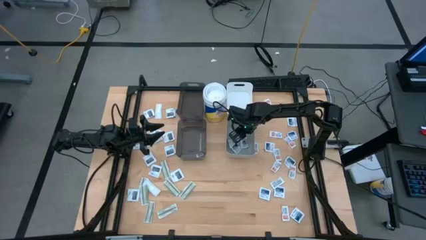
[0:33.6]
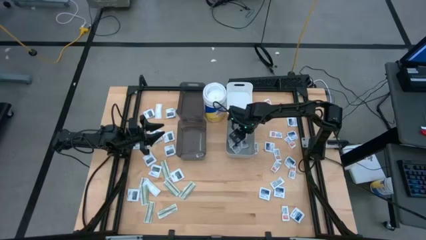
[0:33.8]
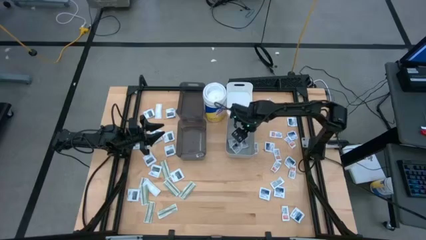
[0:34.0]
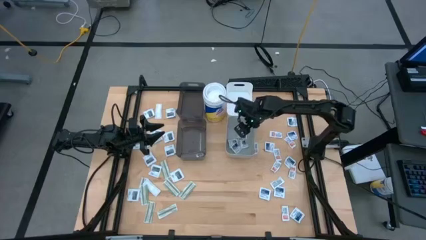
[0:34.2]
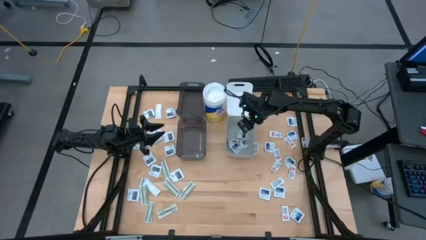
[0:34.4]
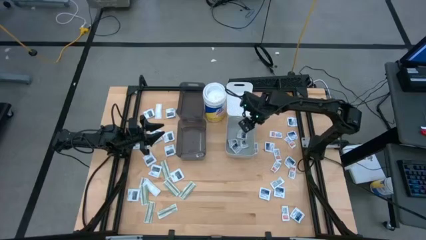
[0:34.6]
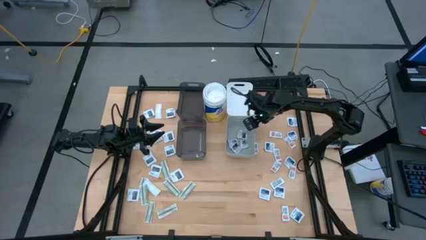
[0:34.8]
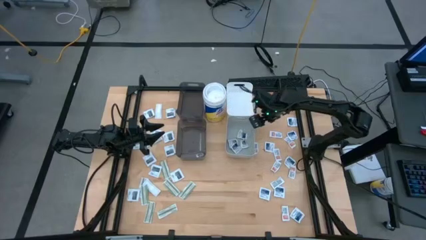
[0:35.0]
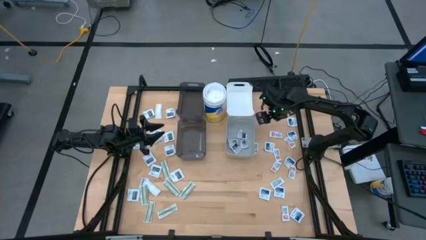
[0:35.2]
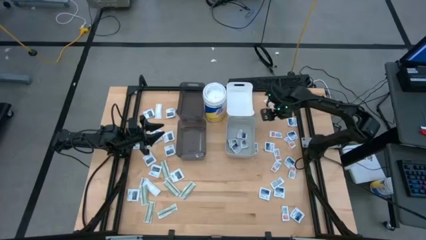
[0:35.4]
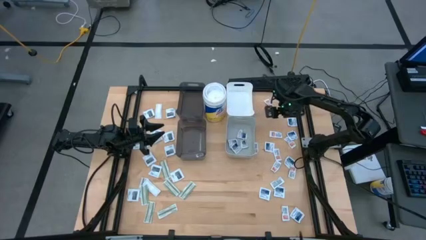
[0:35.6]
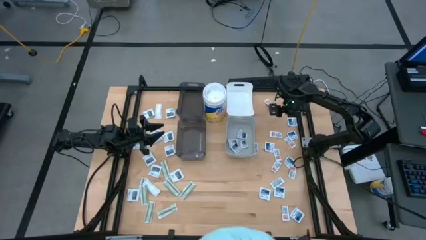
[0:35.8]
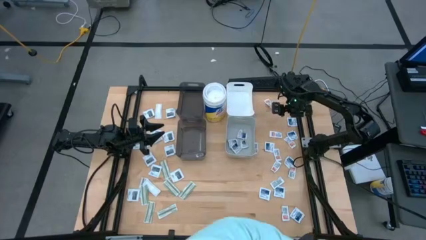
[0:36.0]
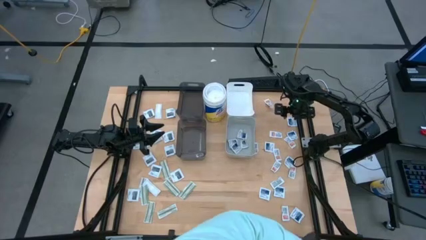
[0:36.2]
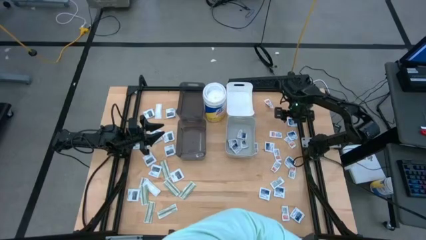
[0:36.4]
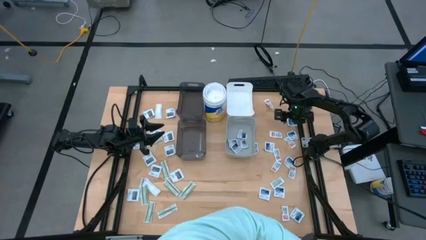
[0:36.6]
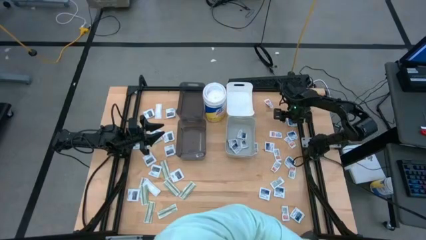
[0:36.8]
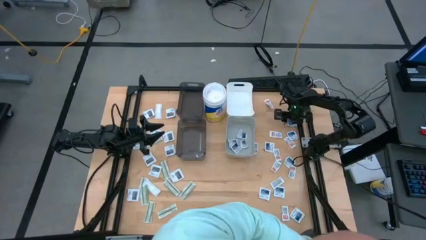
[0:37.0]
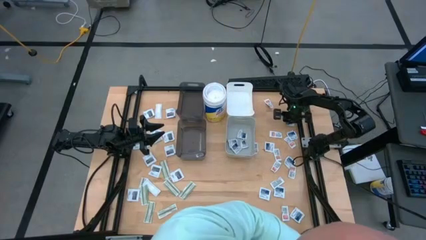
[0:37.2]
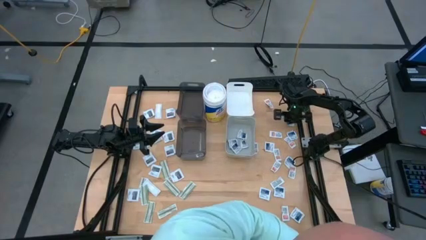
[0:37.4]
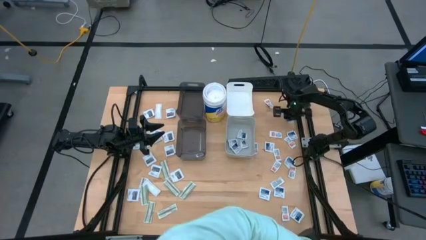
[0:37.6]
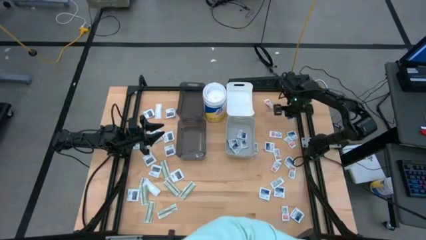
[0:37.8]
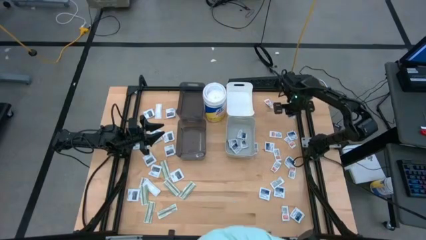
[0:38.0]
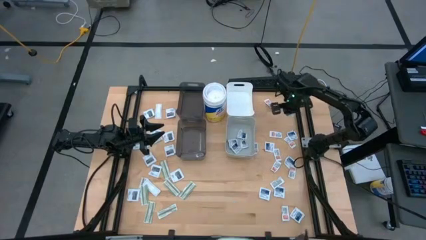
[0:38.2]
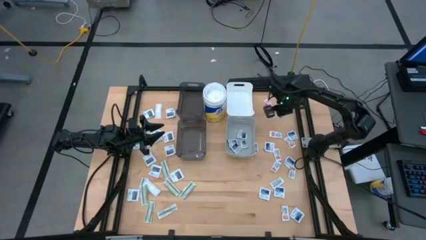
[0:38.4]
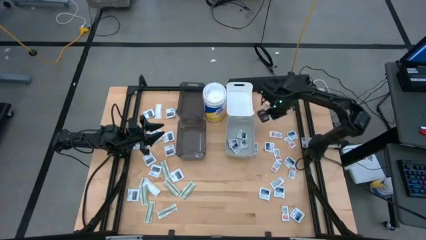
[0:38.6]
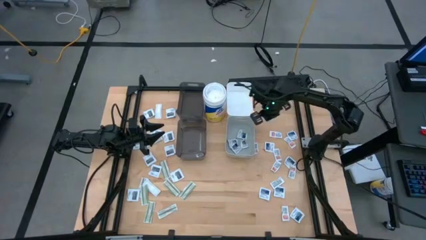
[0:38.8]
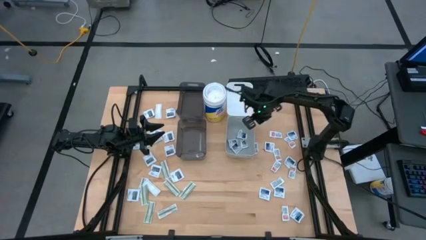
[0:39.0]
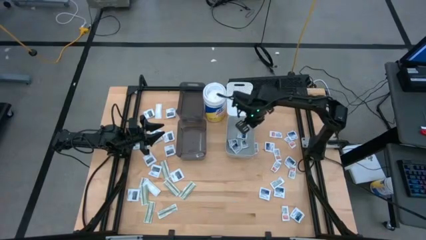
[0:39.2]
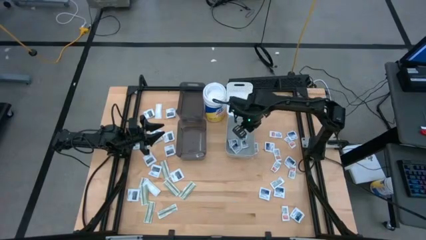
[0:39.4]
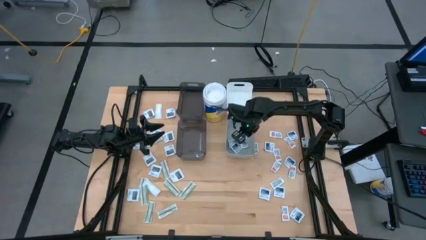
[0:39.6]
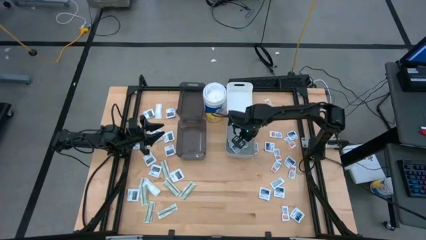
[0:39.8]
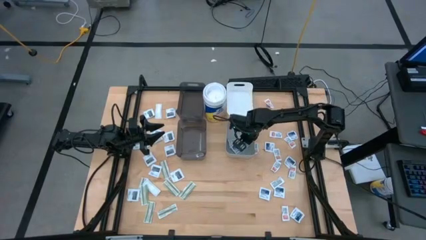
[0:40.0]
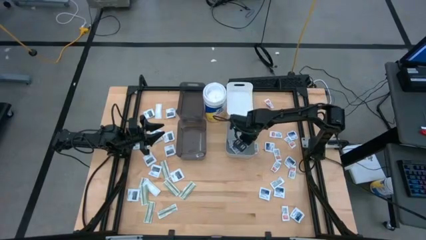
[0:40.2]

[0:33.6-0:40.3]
Task: Pick & Place First Aid Supplies
Put the alcohol pad into the gray bin

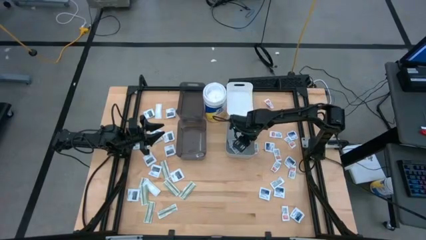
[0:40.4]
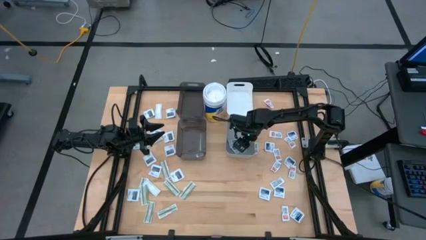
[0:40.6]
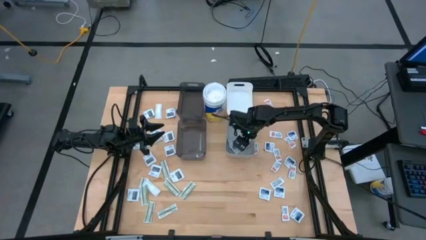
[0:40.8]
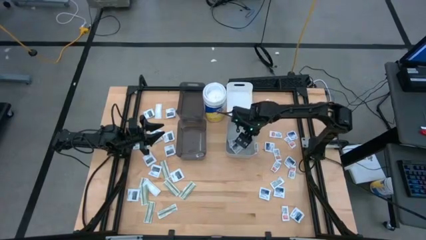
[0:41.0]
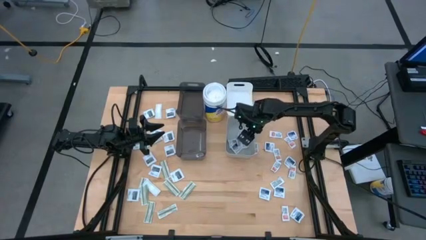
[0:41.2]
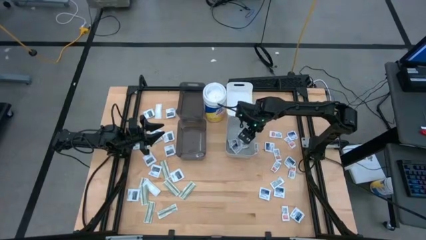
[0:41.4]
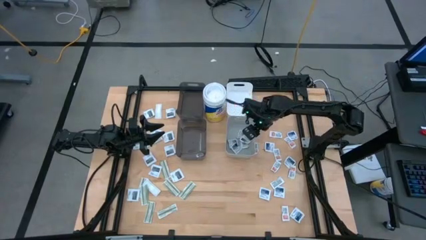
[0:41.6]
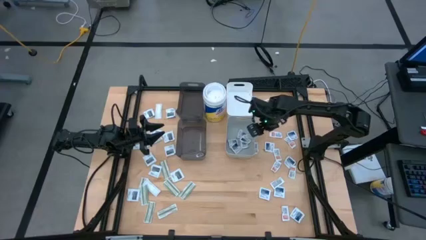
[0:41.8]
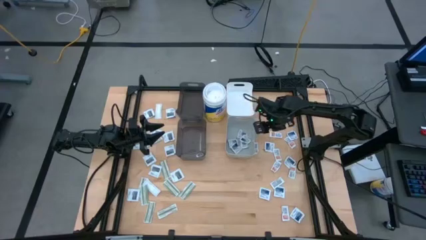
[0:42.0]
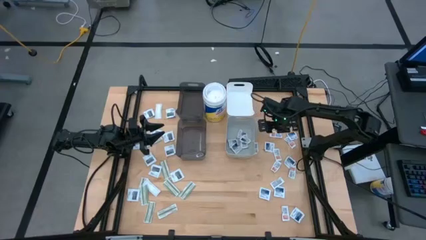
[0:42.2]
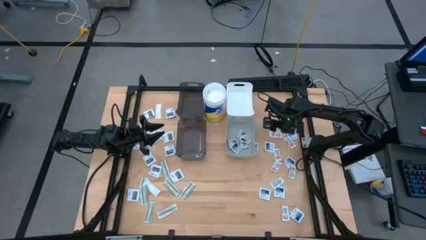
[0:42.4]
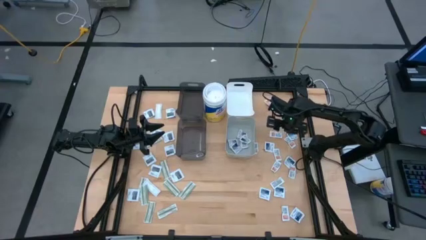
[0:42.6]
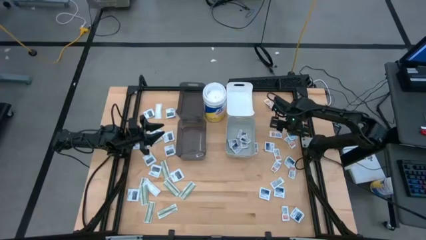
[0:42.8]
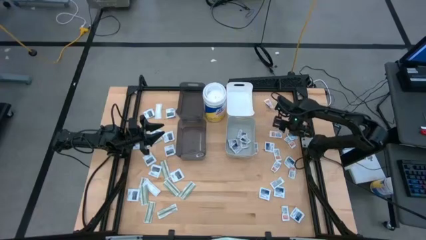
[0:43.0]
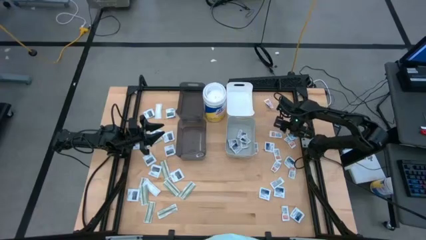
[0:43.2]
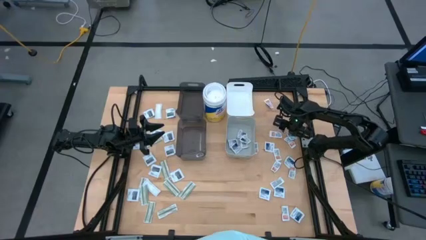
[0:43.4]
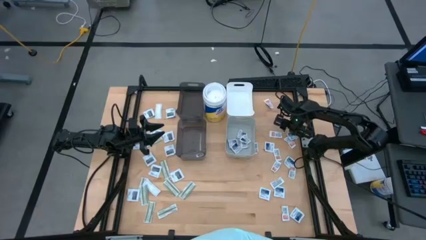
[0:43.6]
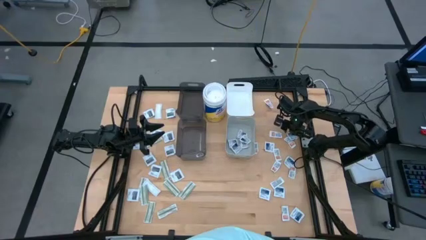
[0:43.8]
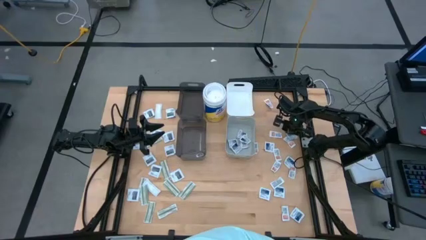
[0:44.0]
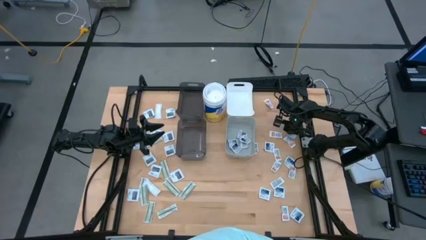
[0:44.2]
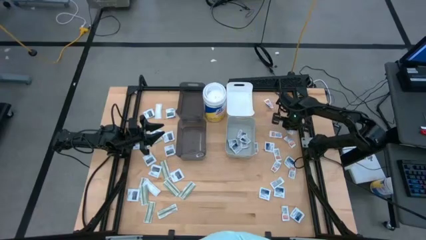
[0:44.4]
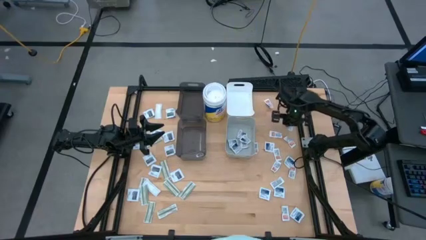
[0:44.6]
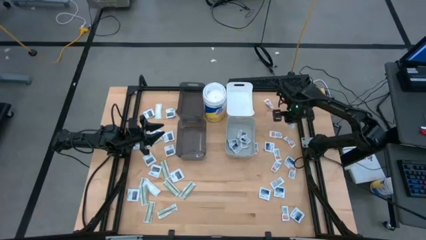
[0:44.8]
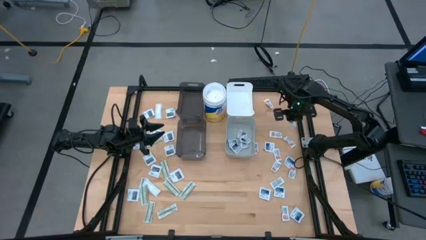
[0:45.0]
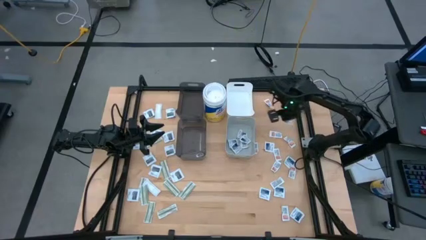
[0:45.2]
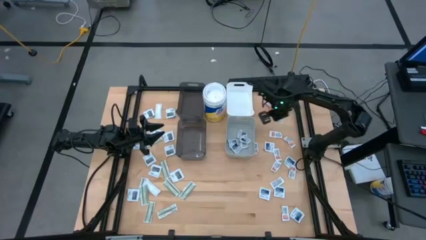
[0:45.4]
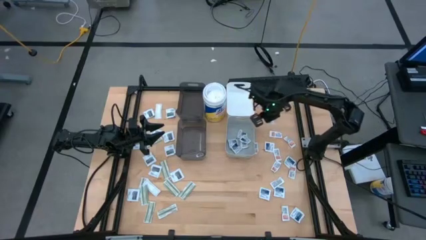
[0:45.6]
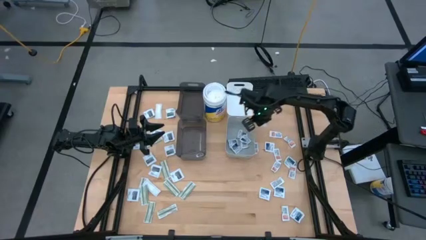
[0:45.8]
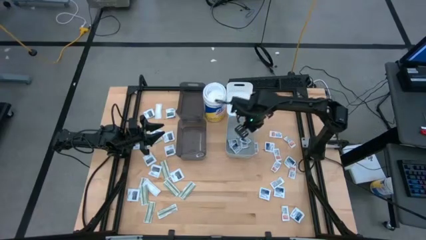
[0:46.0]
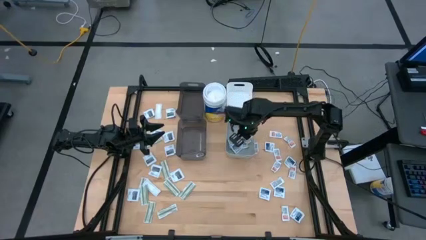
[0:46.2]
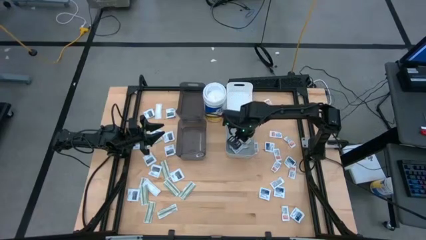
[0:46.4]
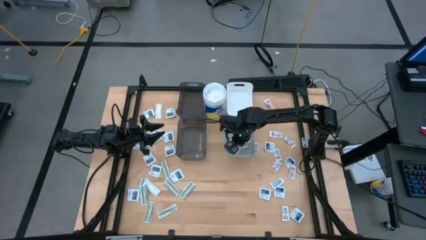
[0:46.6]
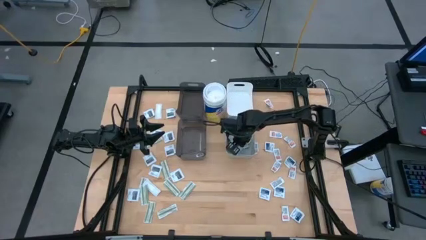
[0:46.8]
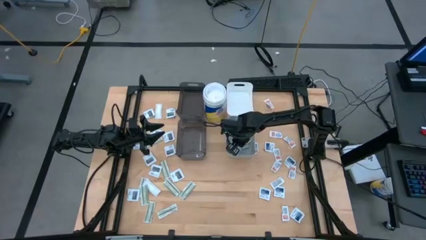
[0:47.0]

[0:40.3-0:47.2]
Put the alcohol pad into the gray bin

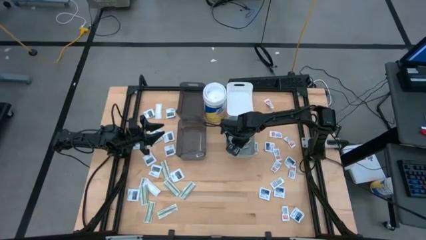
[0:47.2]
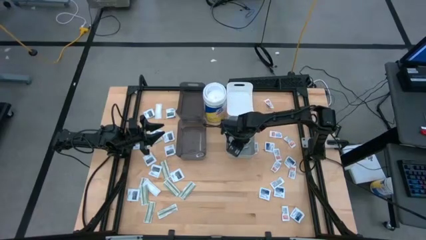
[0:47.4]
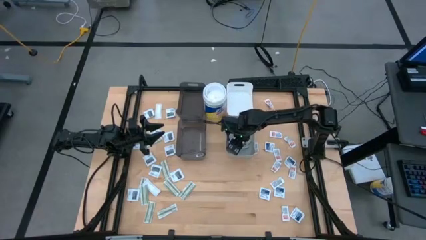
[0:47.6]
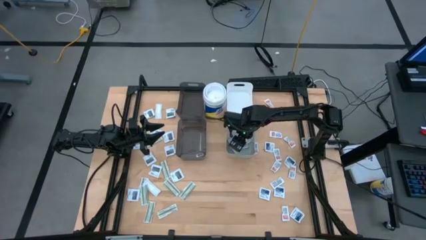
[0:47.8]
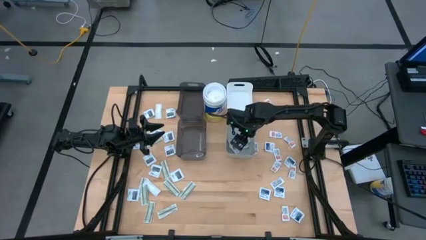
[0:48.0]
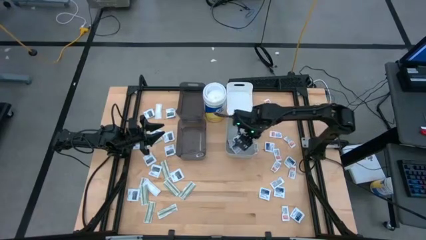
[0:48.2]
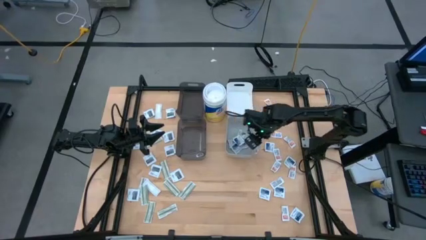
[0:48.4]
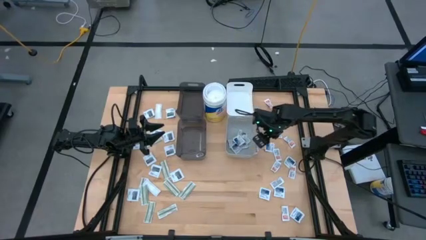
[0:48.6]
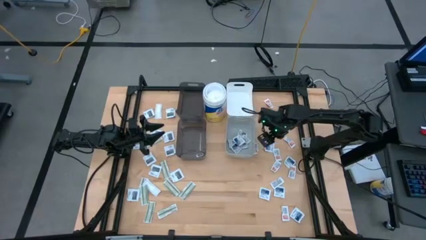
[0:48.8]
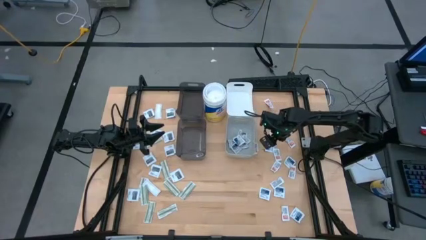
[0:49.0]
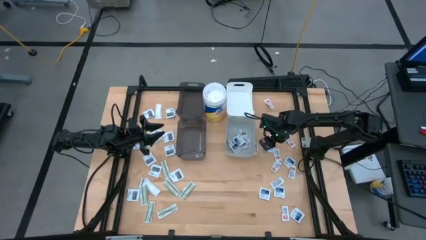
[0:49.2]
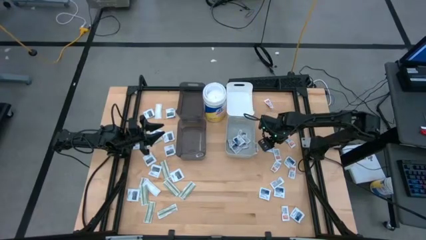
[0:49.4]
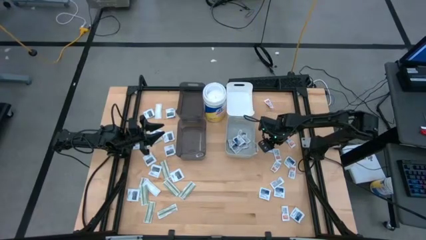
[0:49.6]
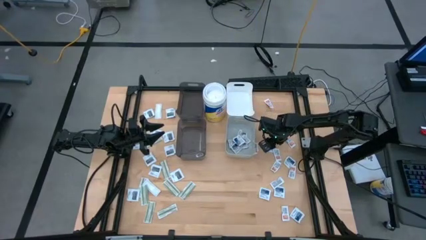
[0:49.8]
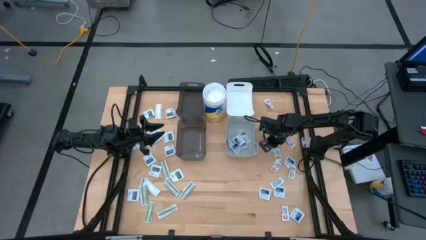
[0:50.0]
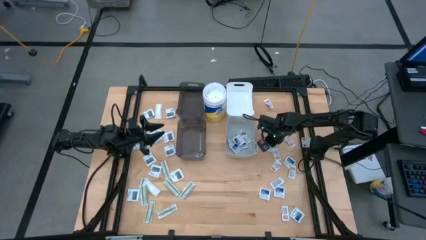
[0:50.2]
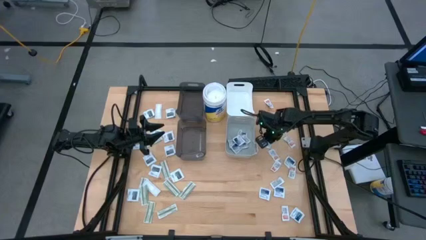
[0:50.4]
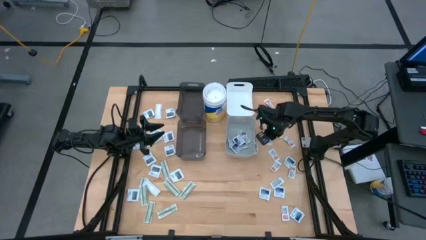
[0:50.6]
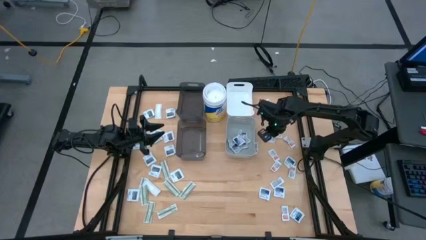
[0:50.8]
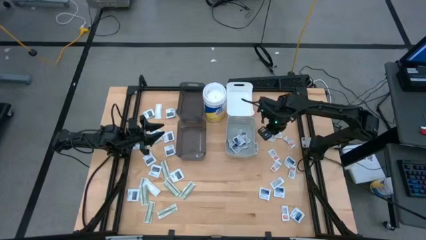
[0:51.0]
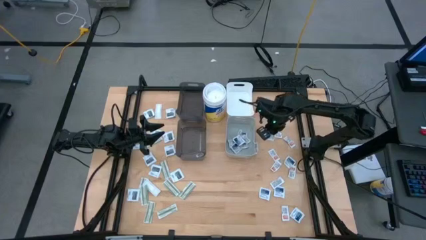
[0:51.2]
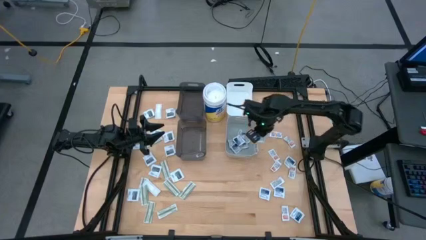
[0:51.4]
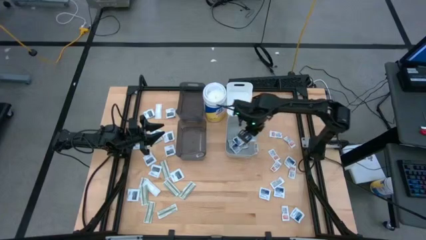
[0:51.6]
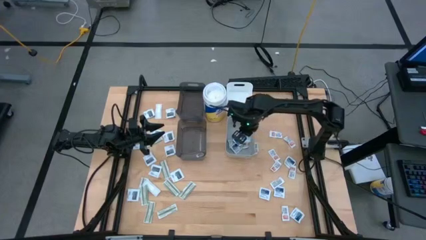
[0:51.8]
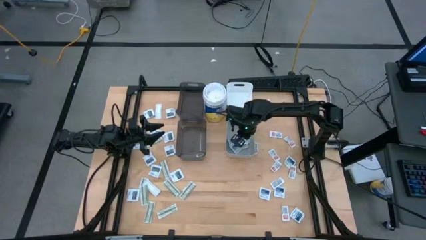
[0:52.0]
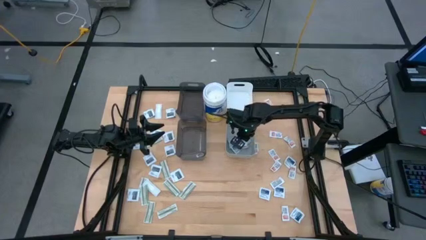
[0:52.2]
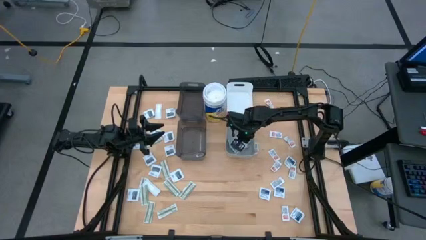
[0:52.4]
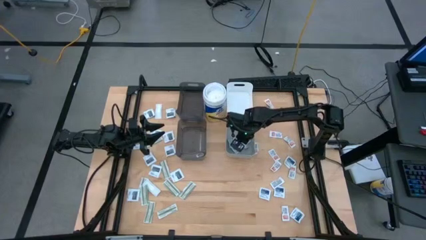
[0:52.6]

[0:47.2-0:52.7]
Put the alcohol pad into the gray bin
